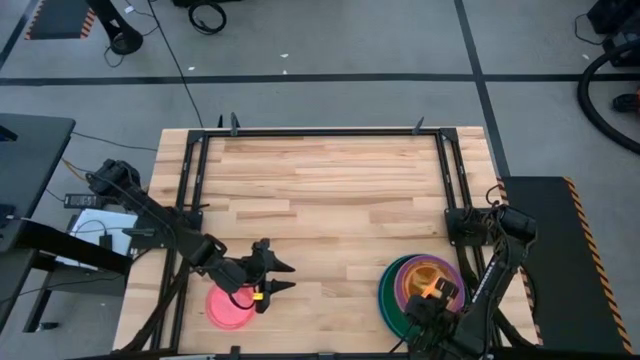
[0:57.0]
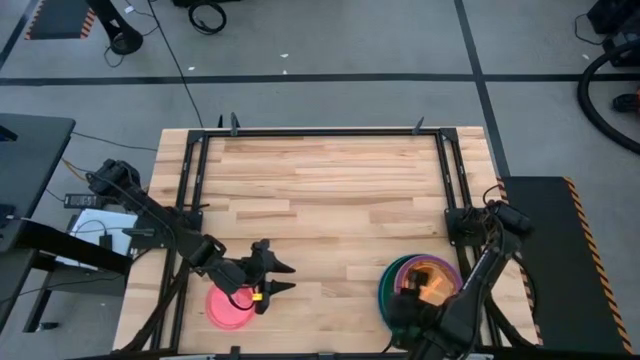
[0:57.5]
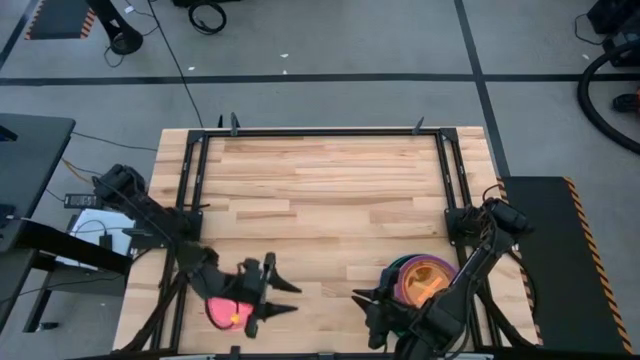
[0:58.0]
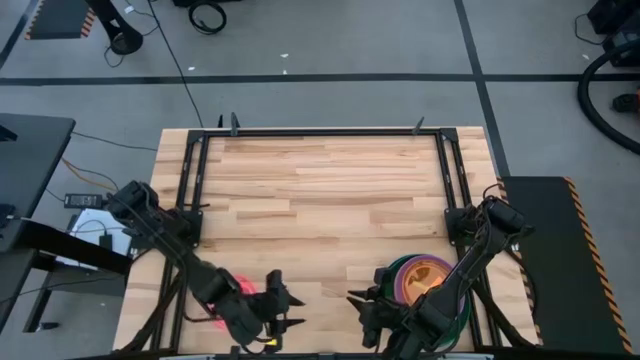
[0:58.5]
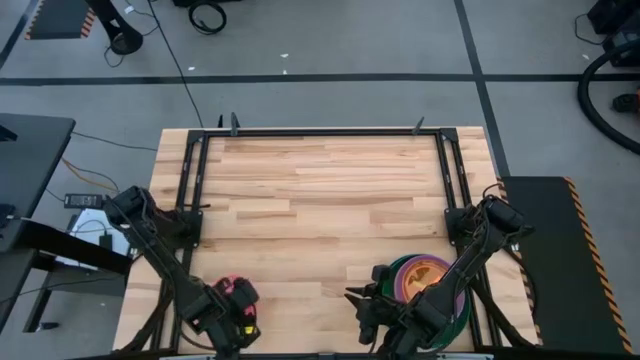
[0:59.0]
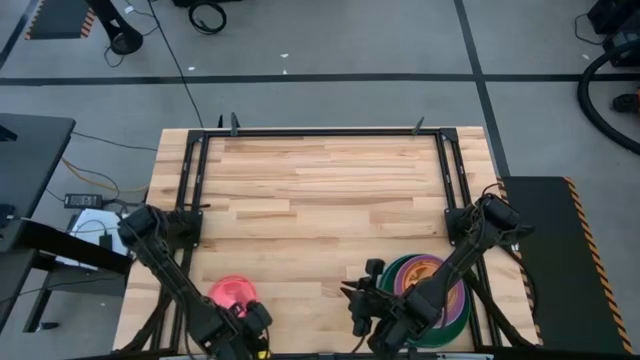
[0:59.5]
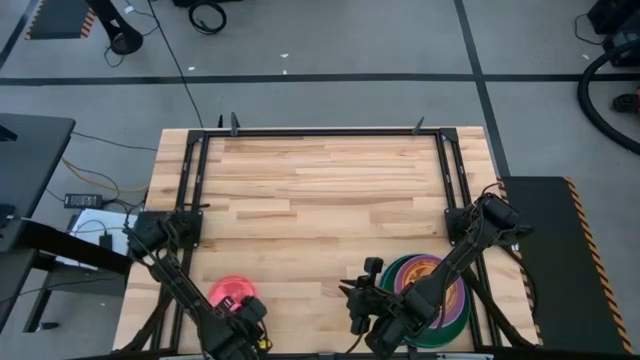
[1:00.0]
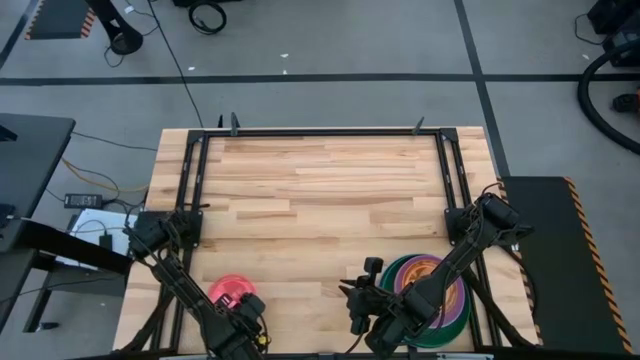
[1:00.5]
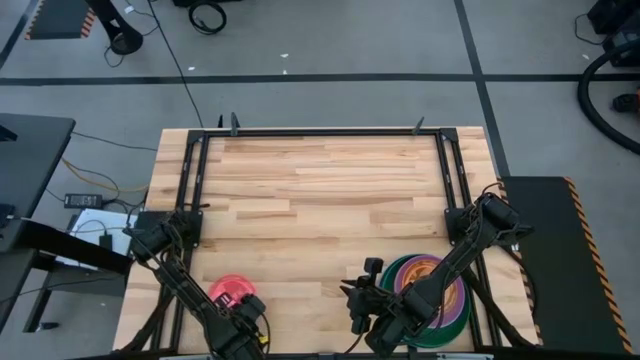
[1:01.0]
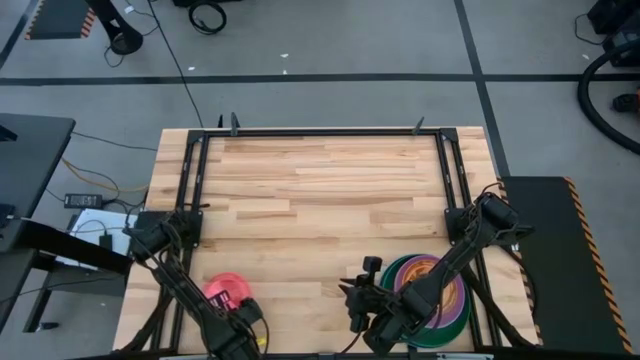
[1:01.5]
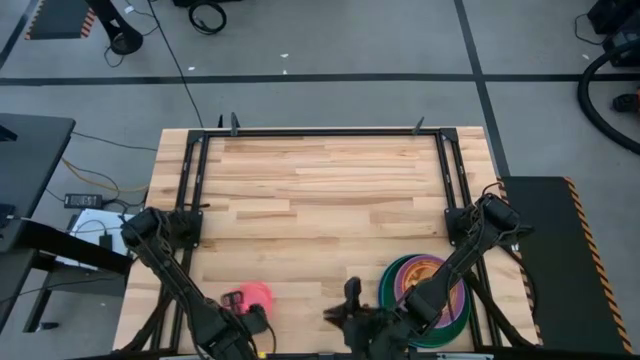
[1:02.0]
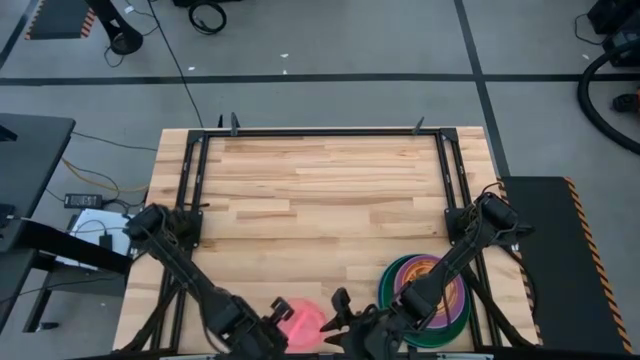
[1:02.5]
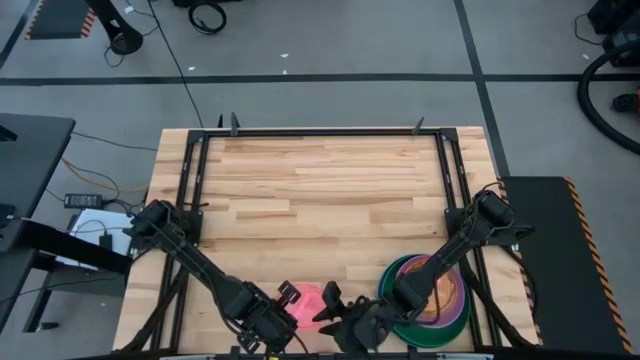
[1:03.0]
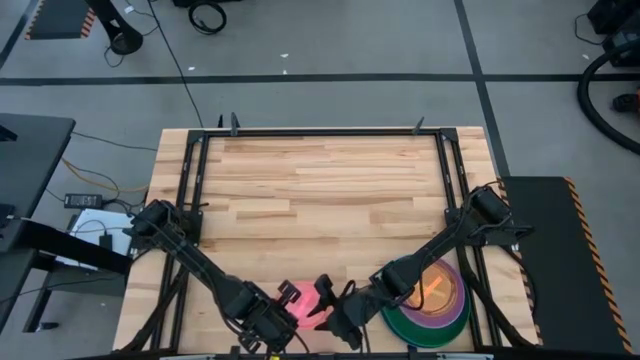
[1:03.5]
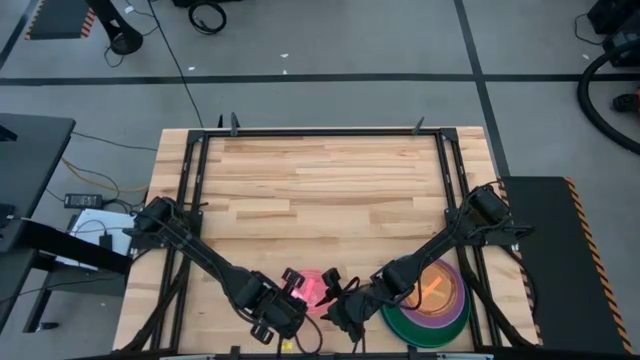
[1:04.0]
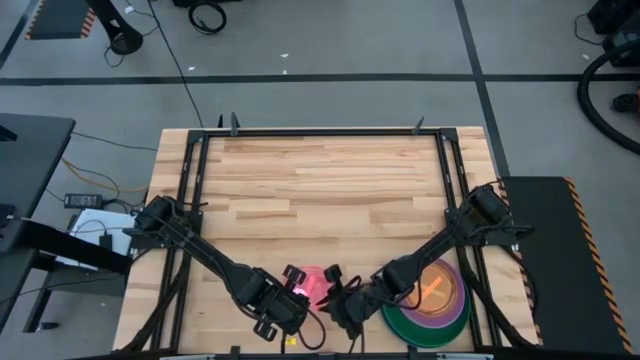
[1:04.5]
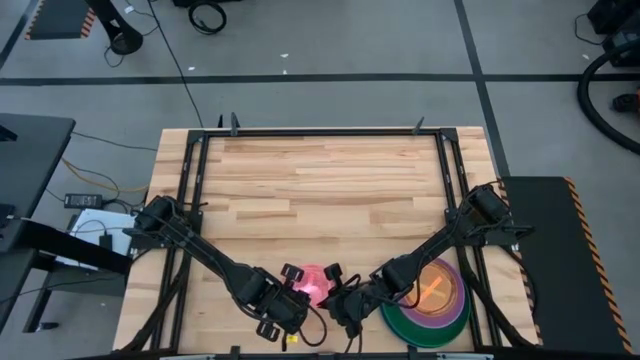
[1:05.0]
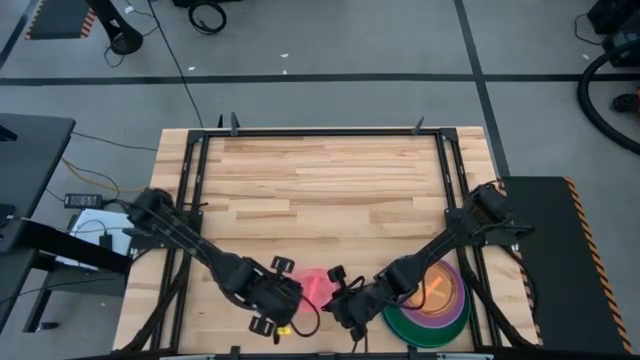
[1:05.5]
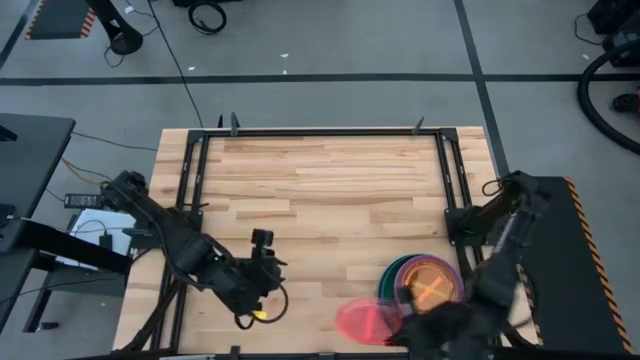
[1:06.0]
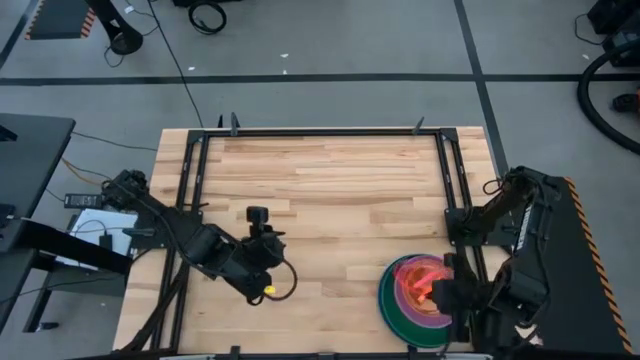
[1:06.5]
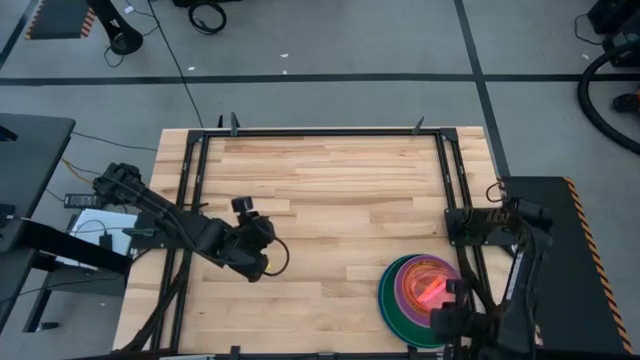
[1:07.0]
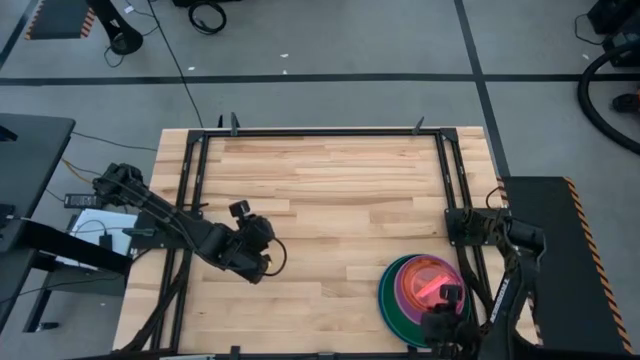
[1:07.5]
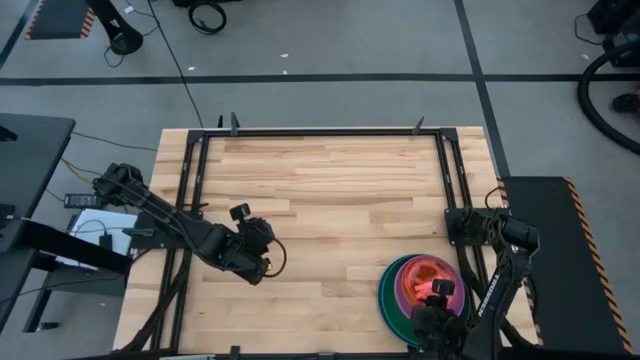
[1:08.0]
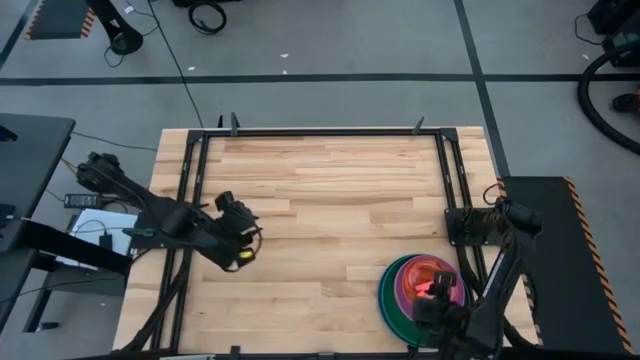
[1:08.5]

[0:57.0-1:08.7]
Task: Stack plastic plates
Stack the pink plate on top of the light orange plate

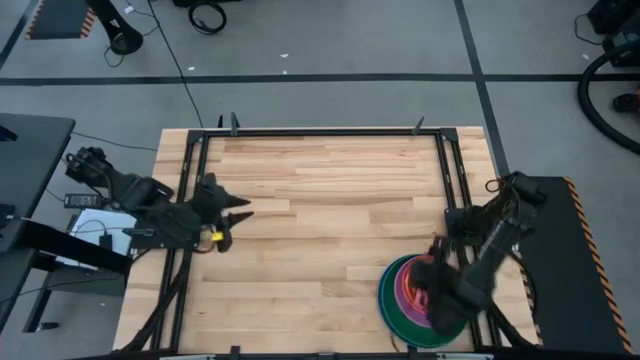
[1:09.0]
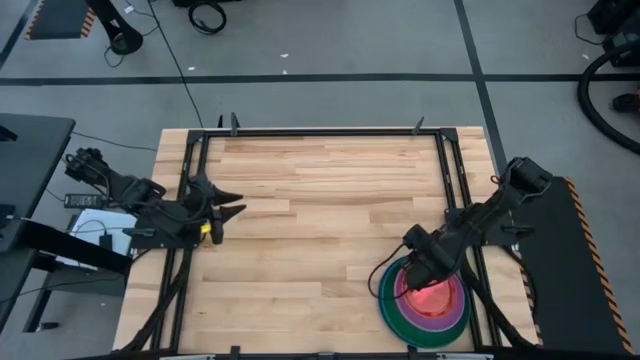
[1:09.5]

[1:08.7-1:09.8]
Adjust the stack of plates

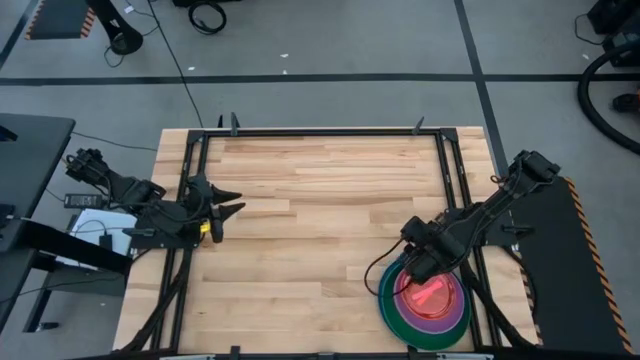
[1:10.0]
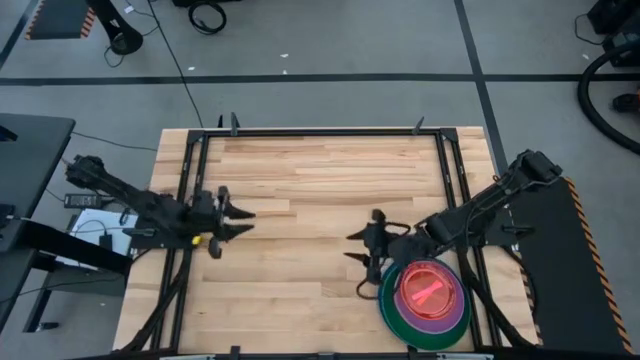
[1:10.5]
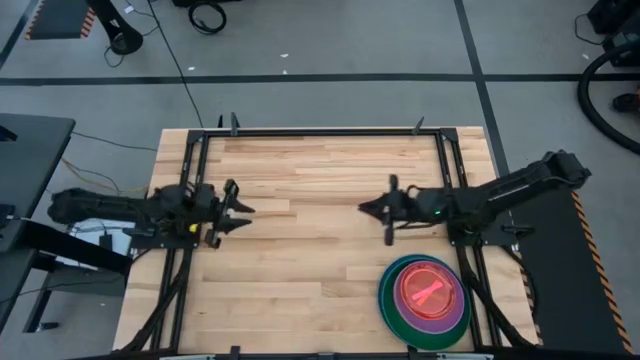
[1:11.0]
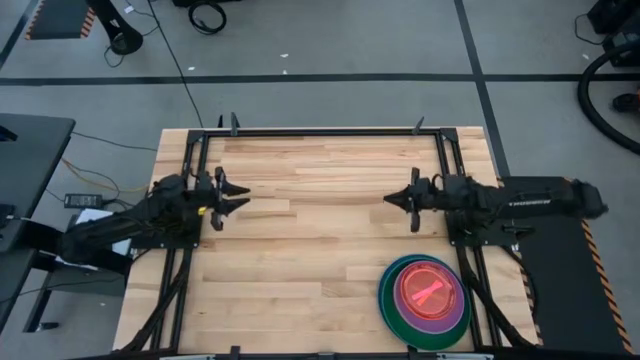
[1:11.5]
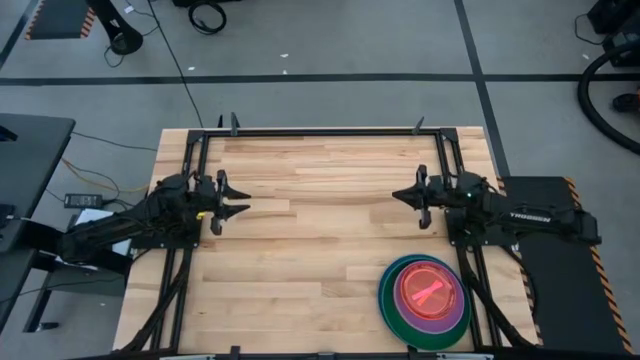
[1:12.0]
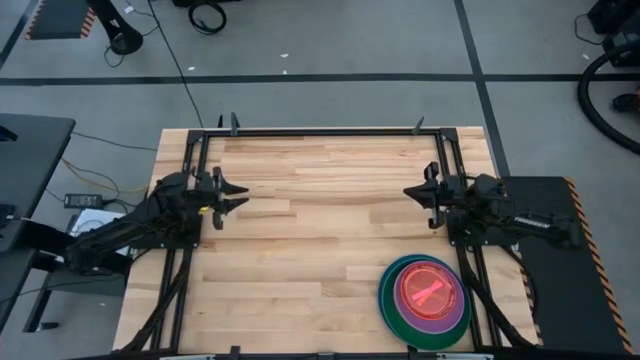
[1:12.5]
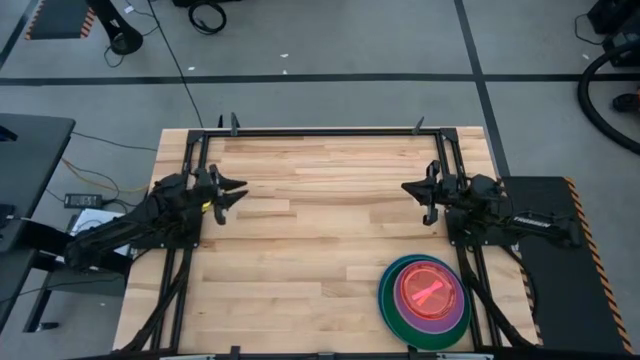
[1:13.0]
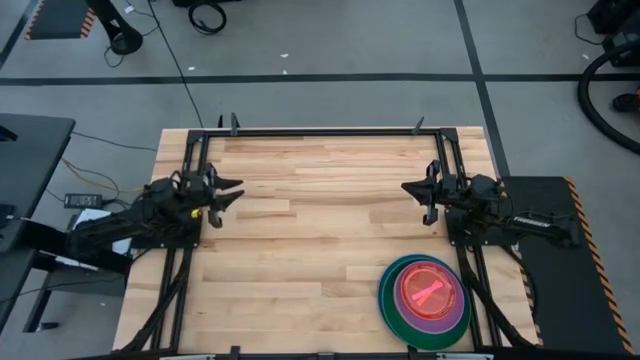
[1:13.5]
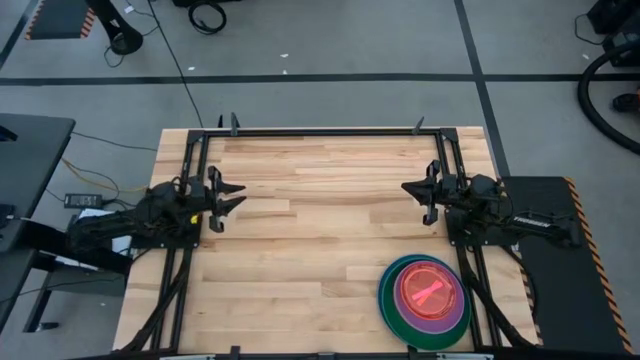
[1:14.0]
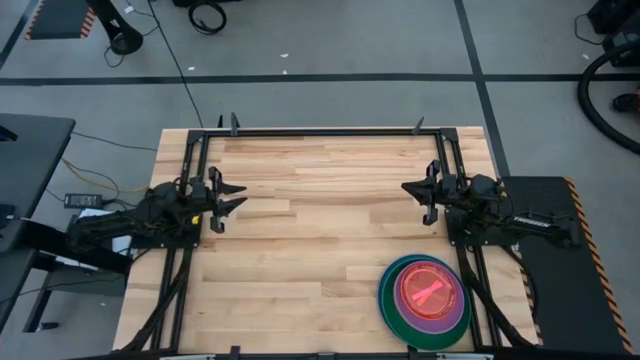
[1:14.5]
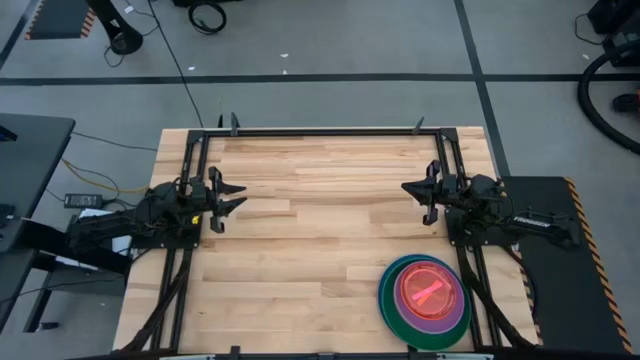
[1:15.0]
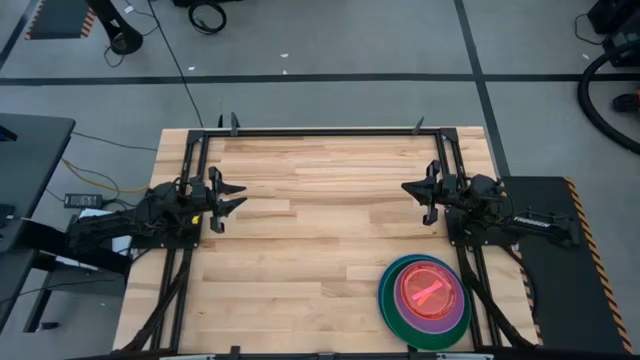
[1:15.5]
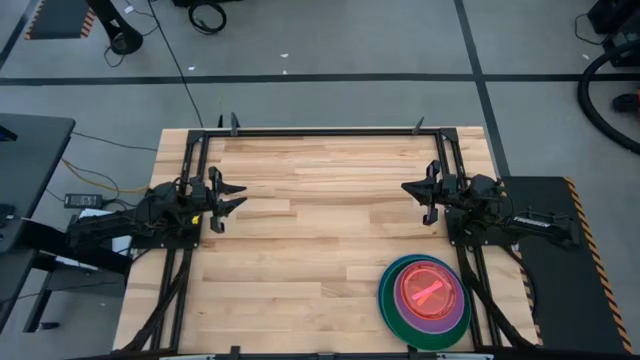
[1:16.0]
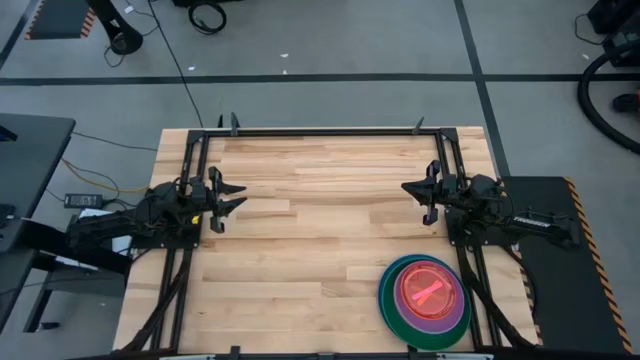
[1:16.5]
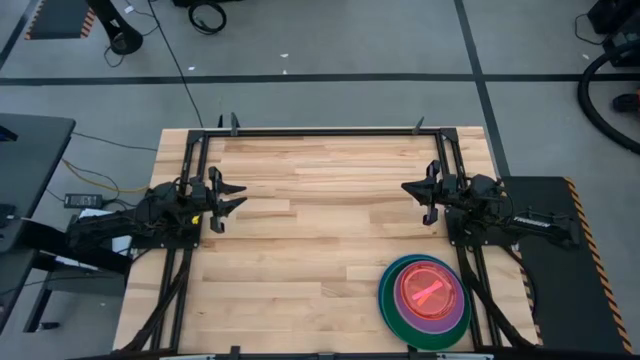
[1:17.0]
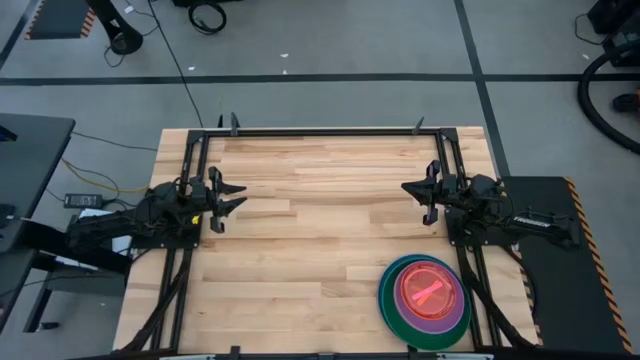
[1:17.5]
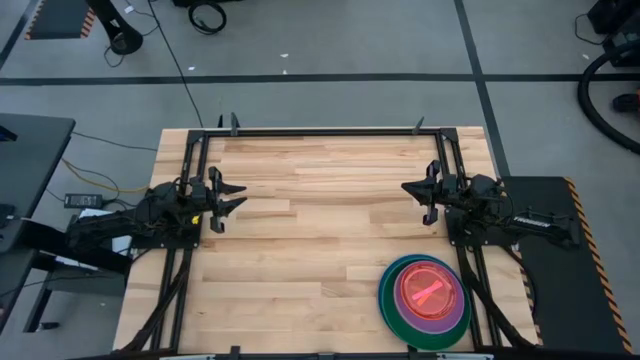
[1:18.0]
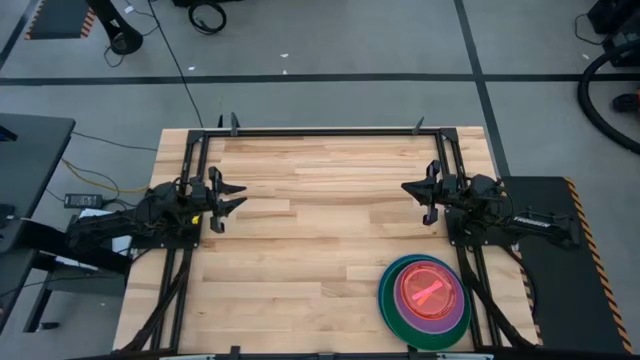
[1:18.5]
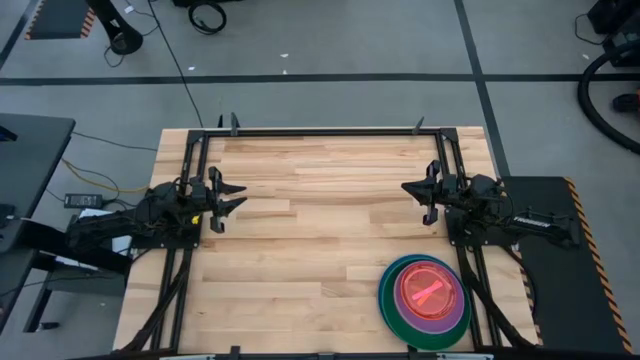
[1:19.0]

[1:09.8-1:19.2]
Return to Home Position
